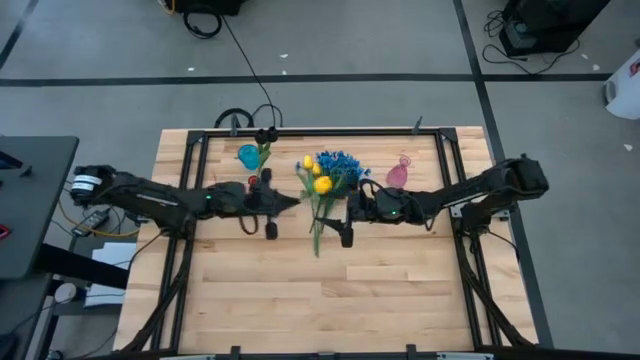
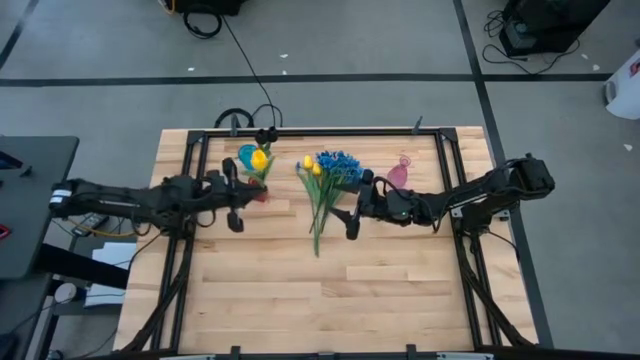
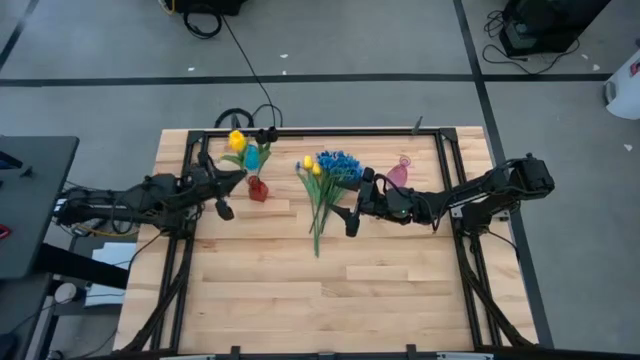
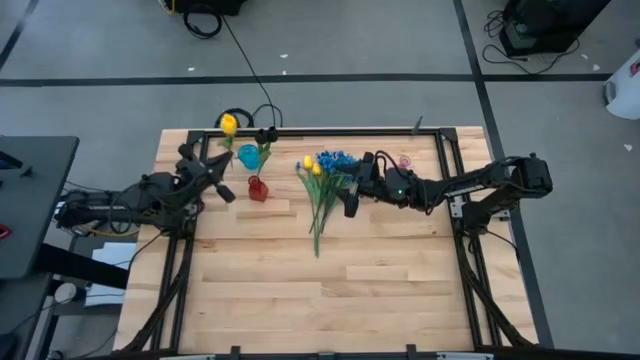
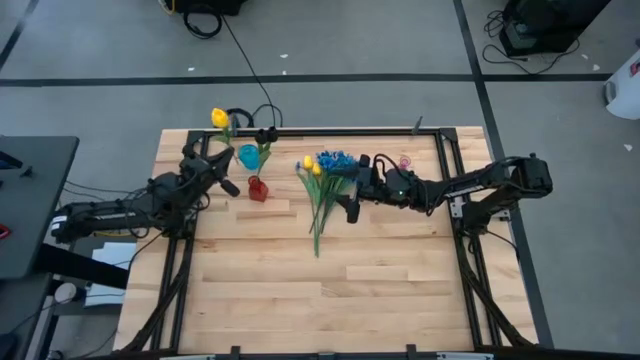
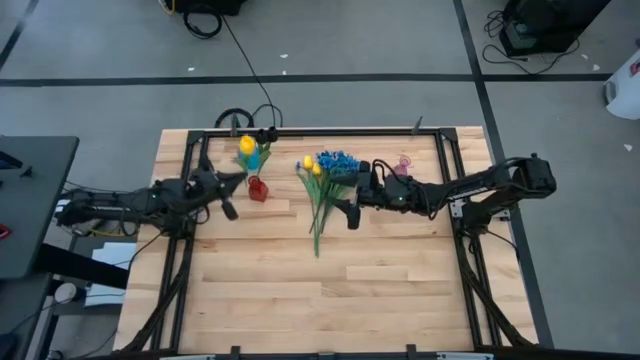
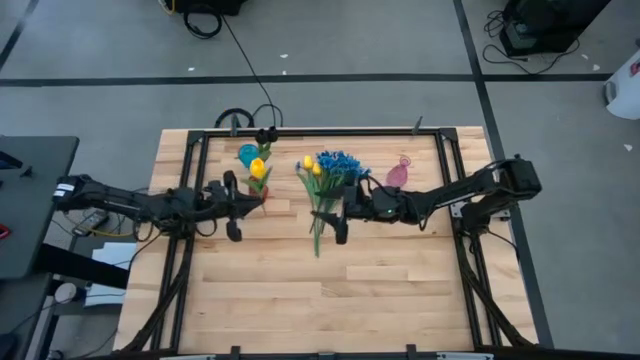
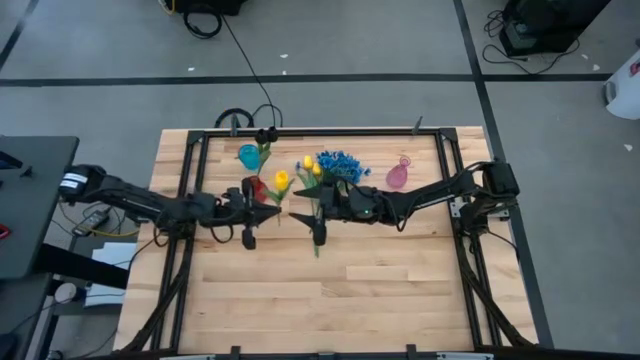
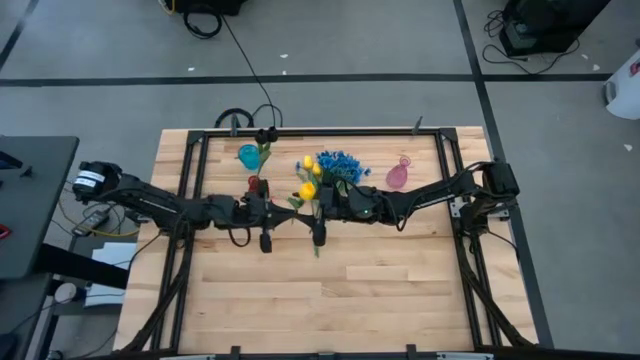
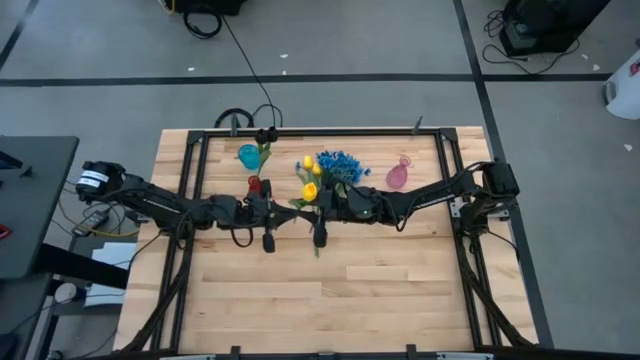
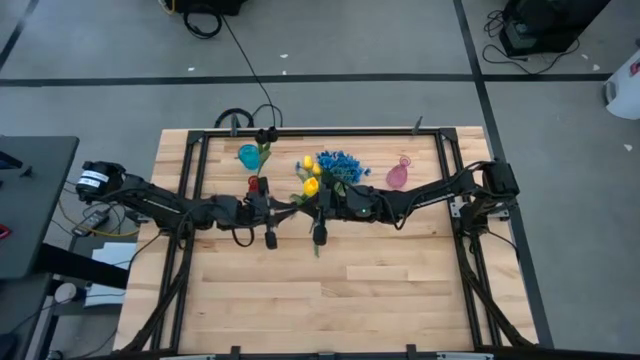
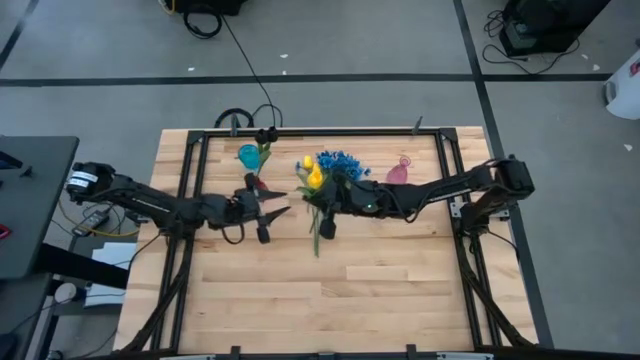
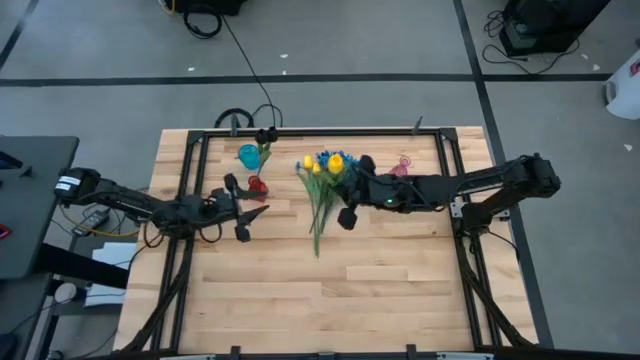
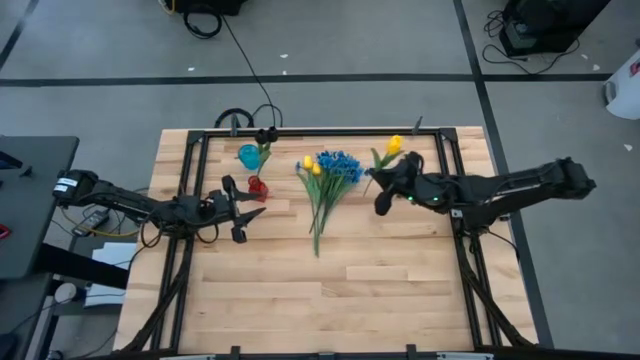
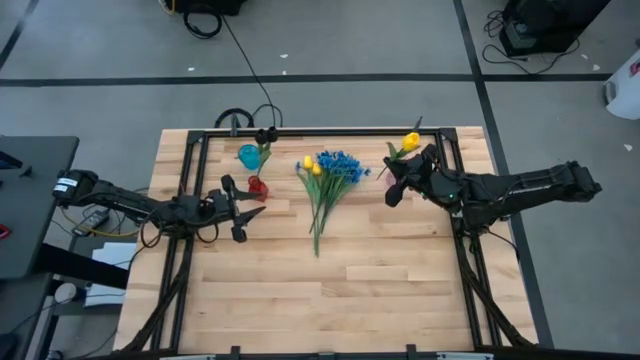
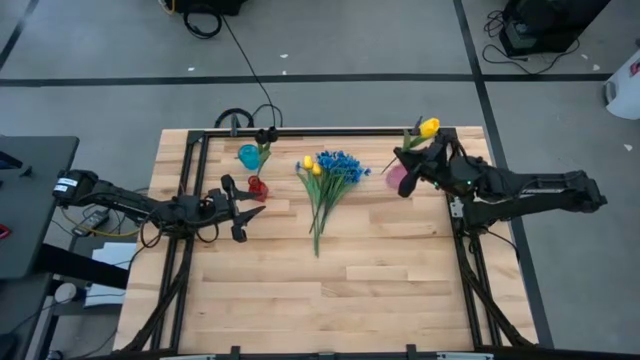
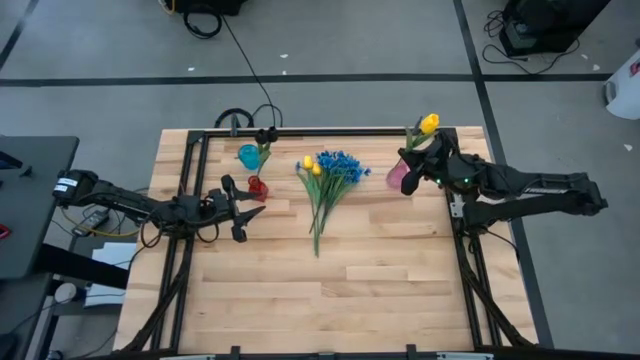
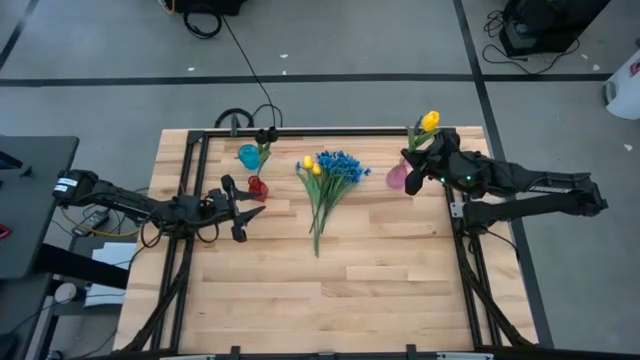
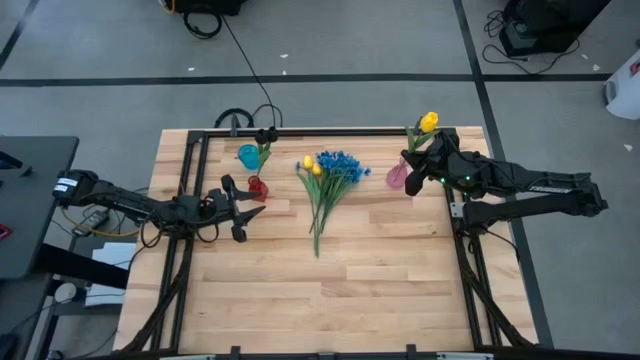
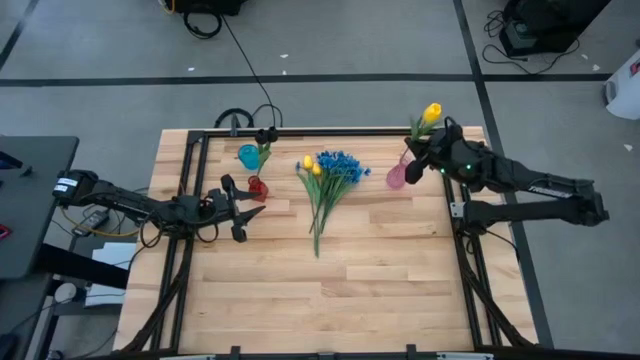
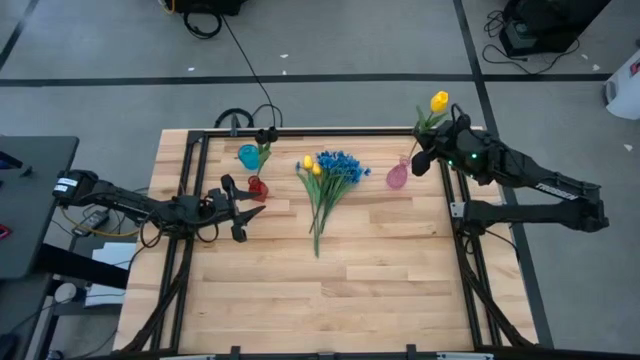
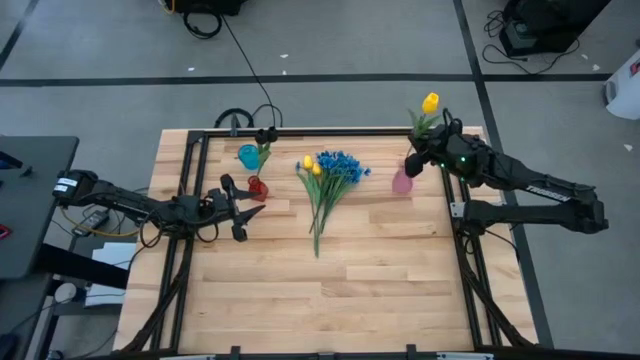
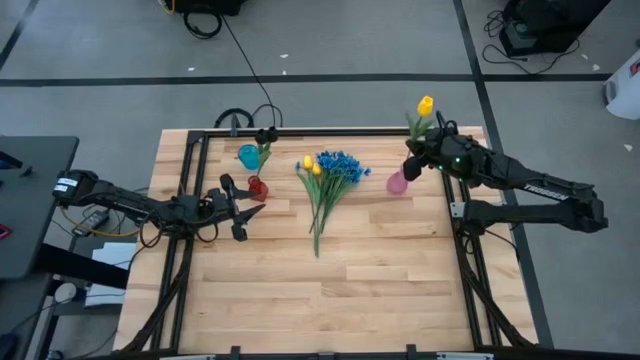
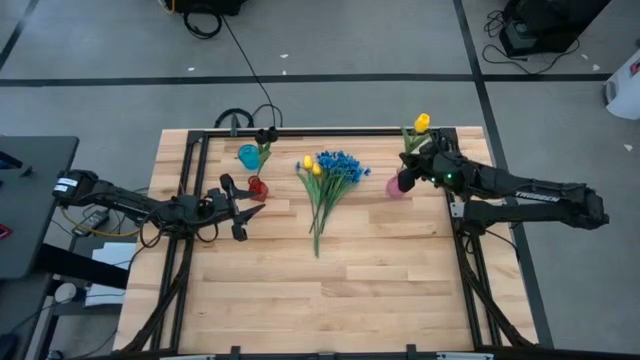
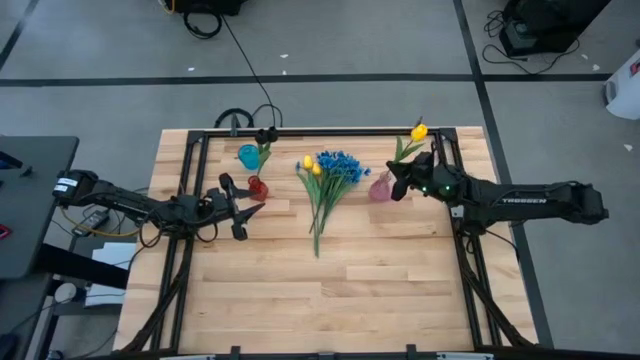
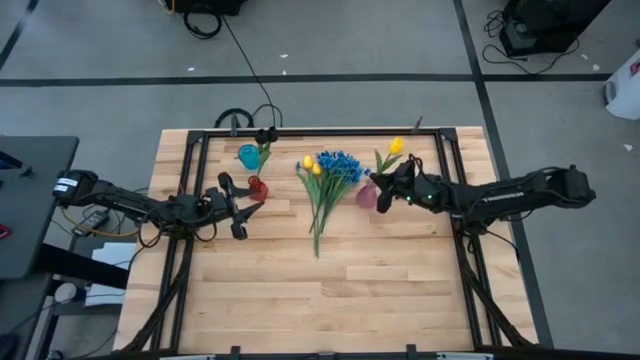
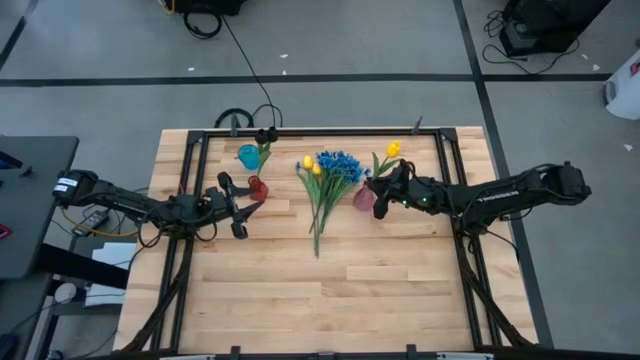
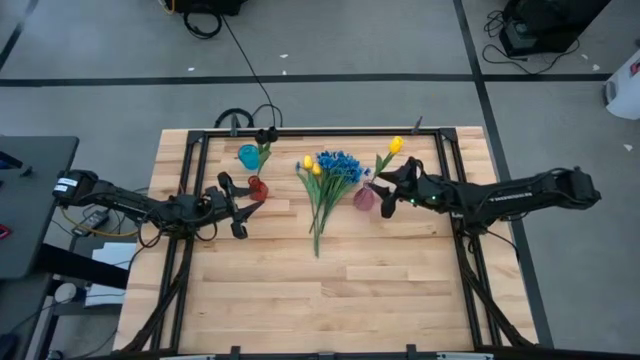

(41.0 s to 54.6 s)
Task: Sort flowers into vase by color
Put the yellow flower into the pink vase

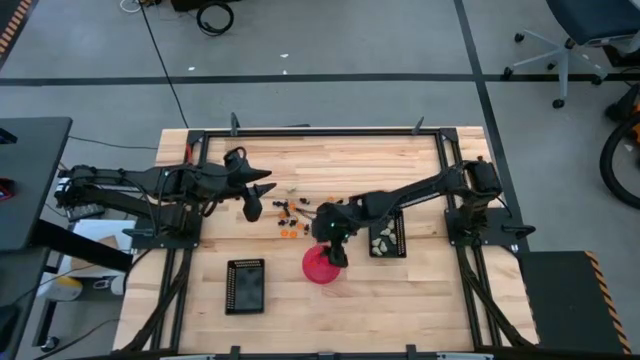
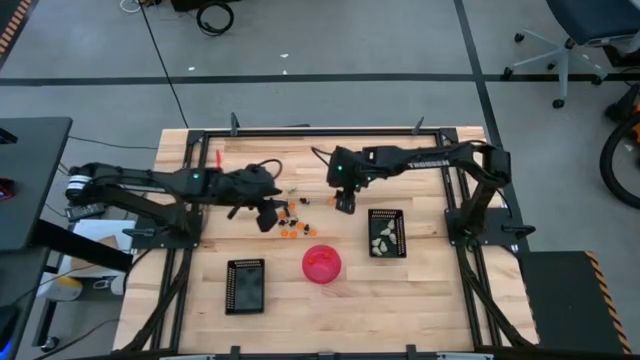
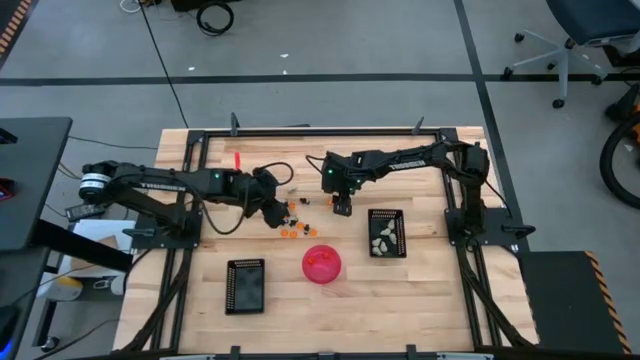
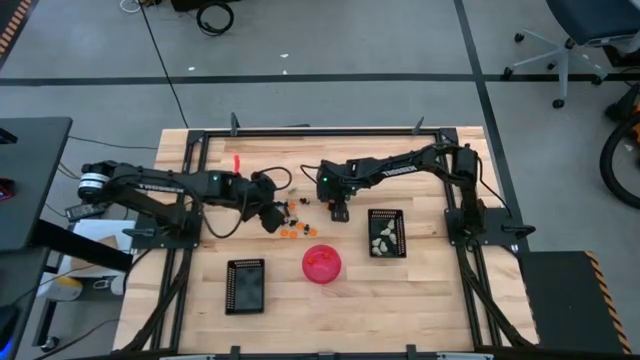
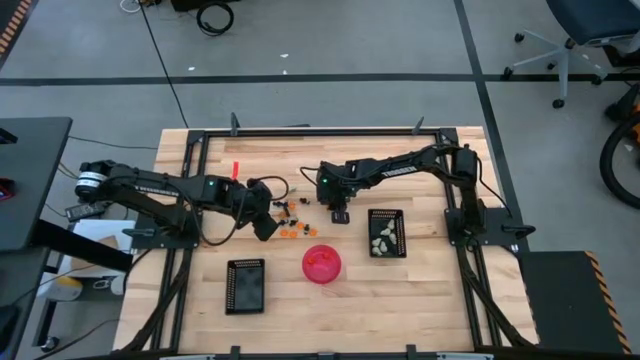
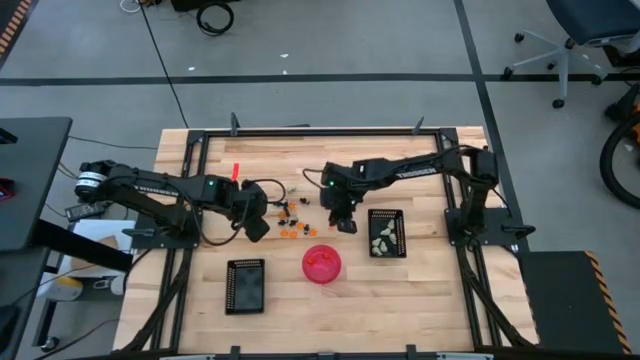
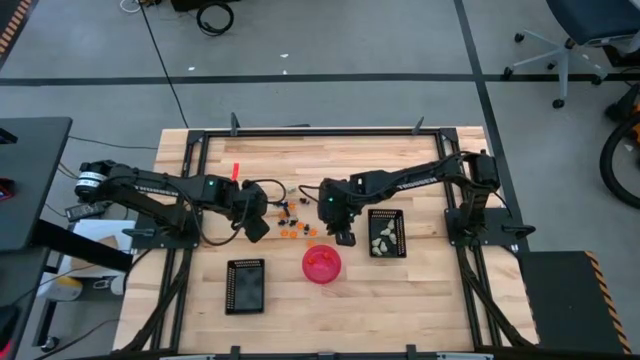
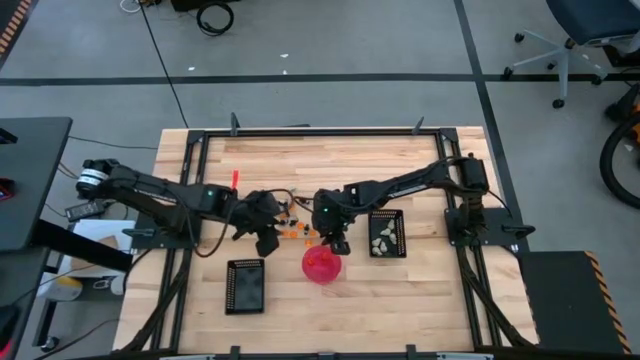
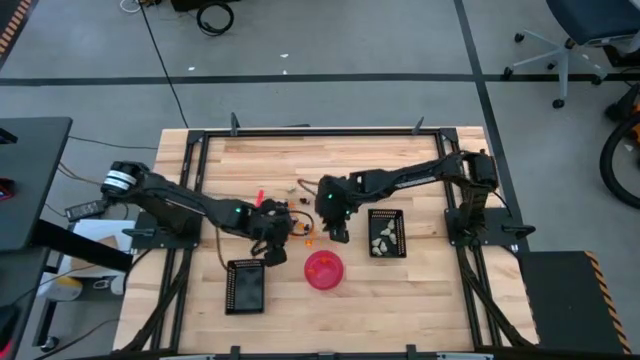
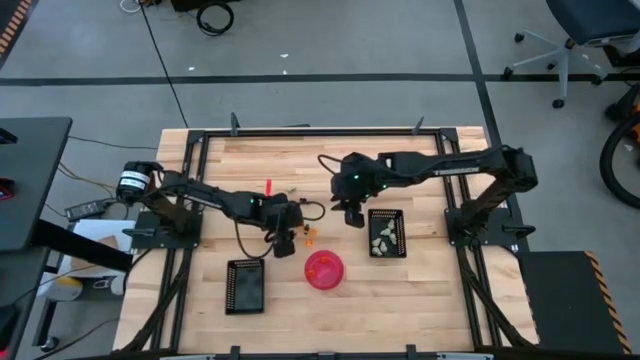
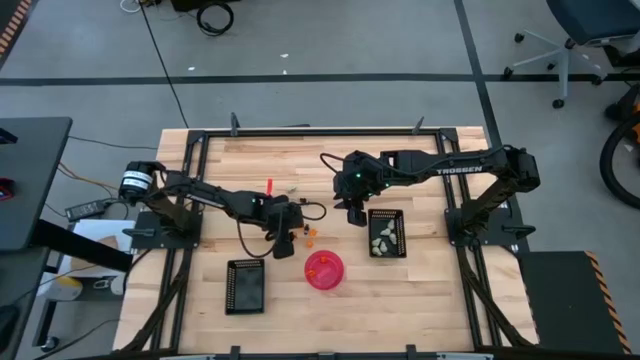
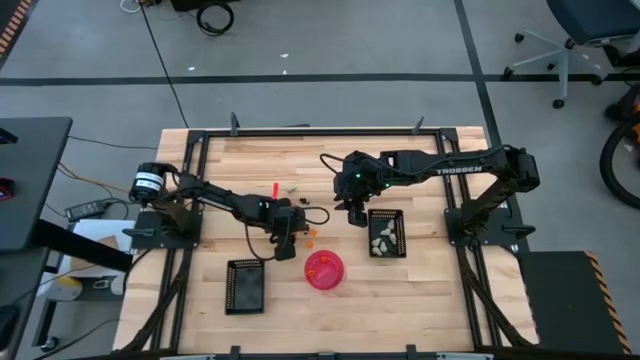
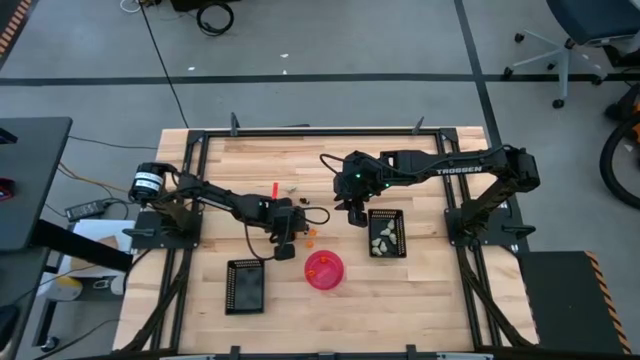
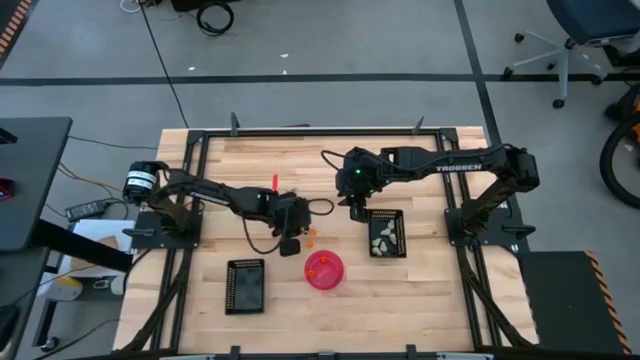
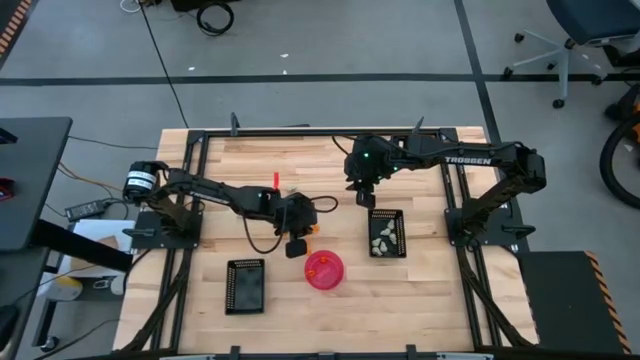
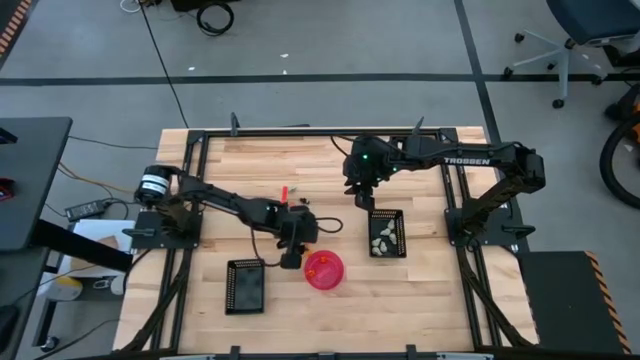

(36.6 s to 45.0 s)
Task: Sort Halloween decoration
Put the orange pumpkin toy into the pink bowl
